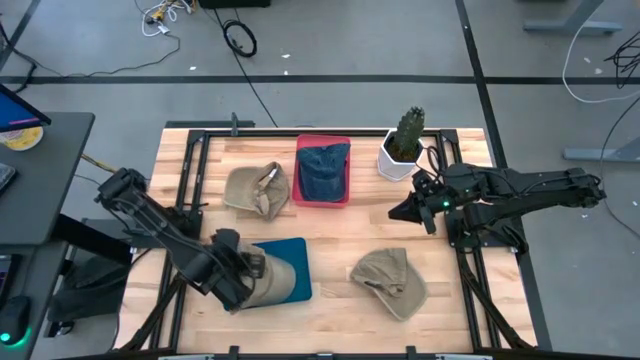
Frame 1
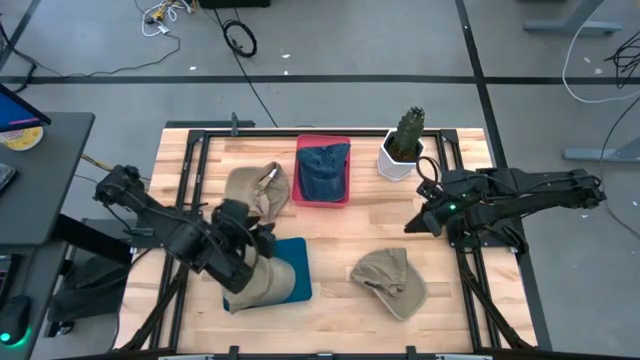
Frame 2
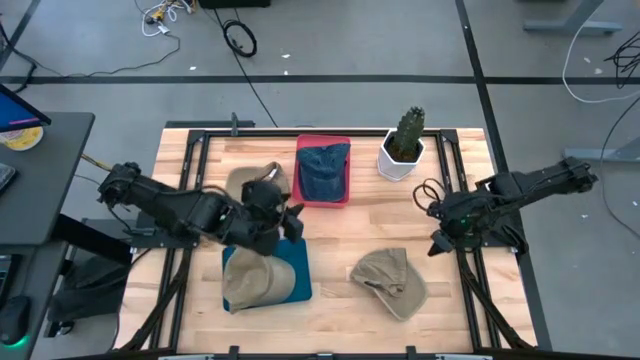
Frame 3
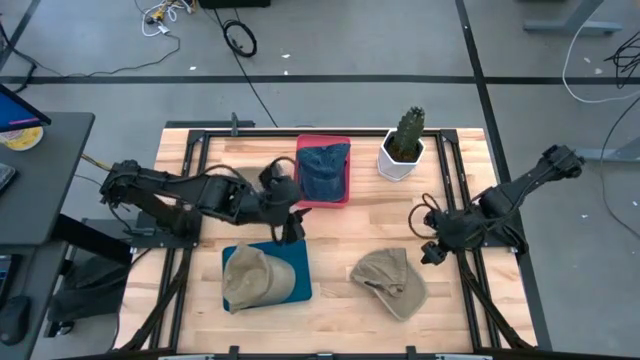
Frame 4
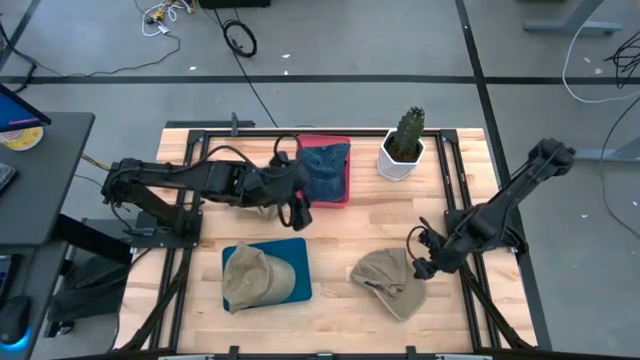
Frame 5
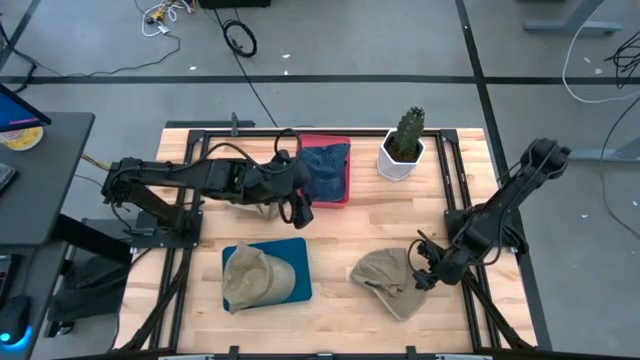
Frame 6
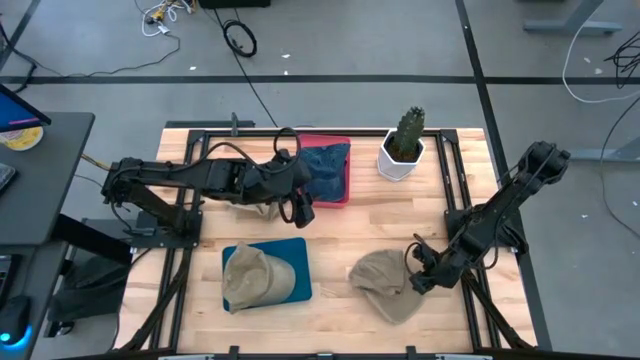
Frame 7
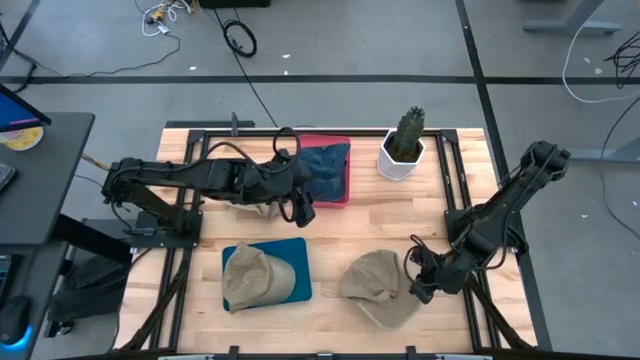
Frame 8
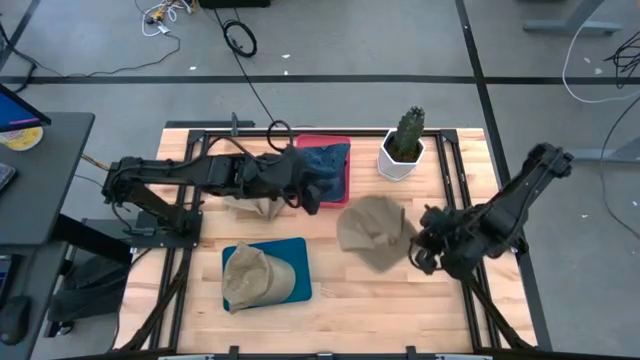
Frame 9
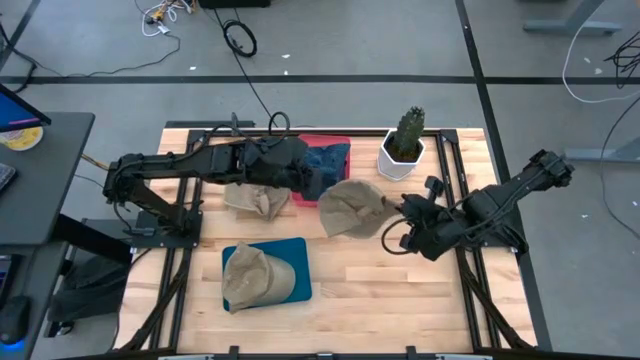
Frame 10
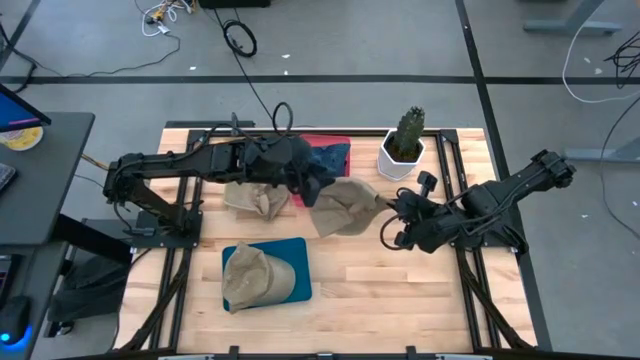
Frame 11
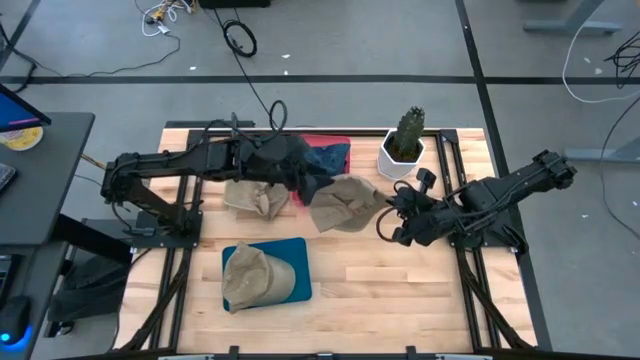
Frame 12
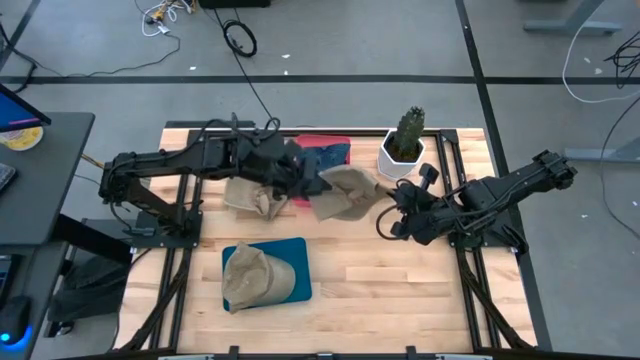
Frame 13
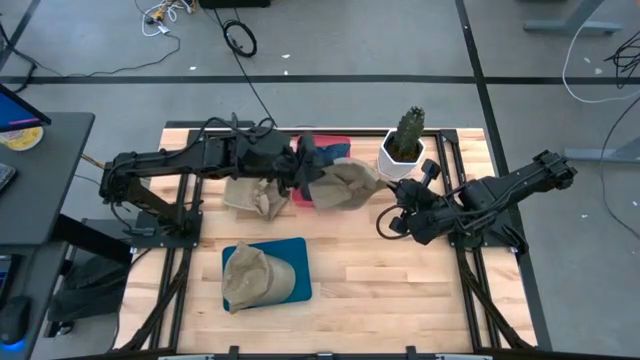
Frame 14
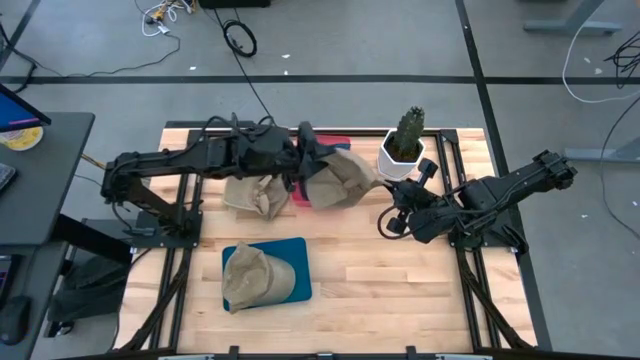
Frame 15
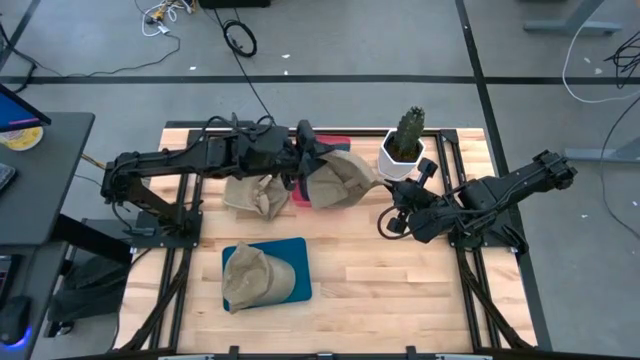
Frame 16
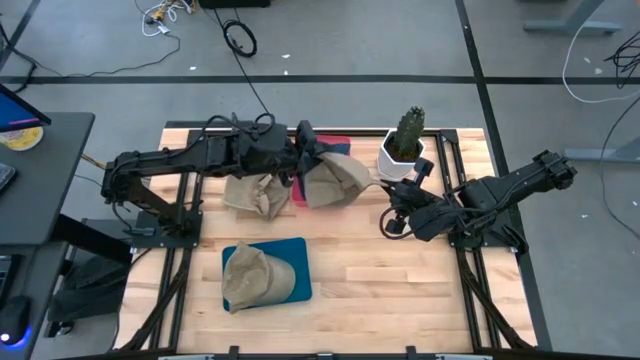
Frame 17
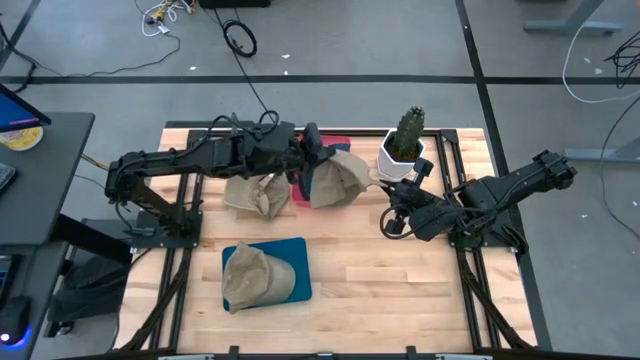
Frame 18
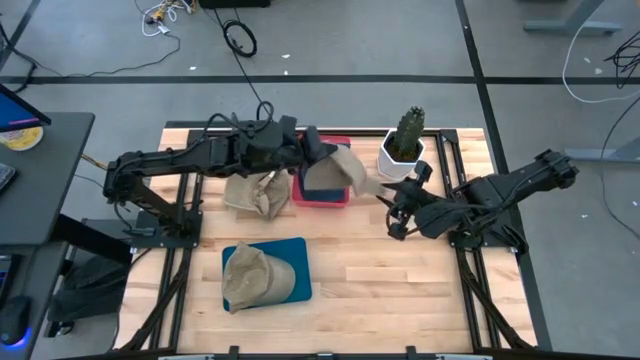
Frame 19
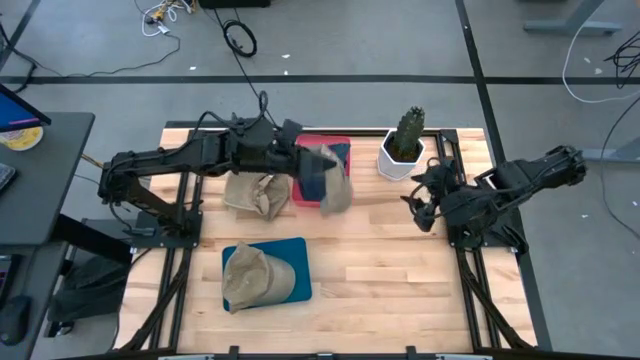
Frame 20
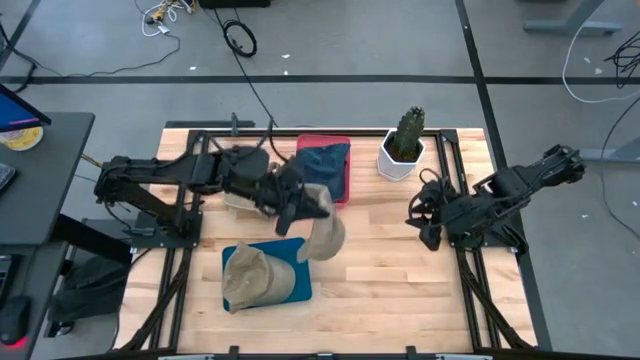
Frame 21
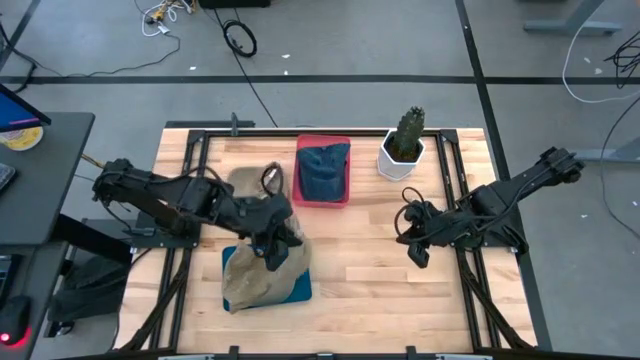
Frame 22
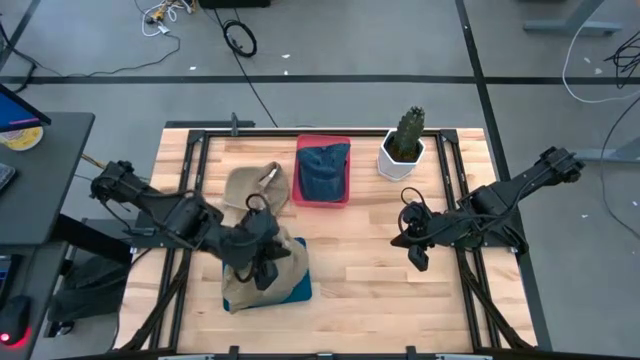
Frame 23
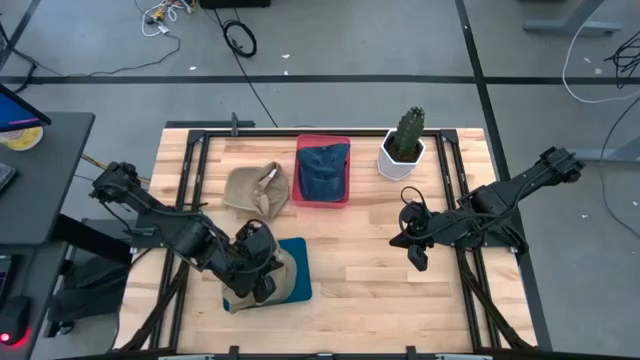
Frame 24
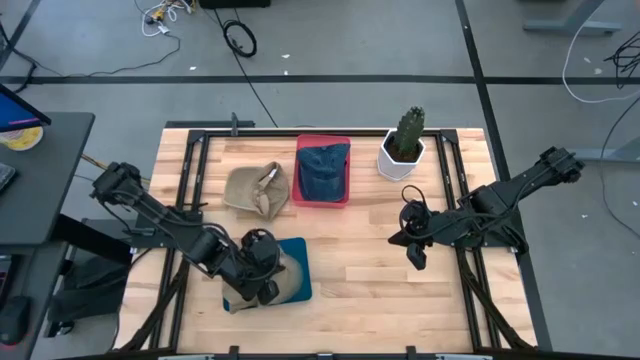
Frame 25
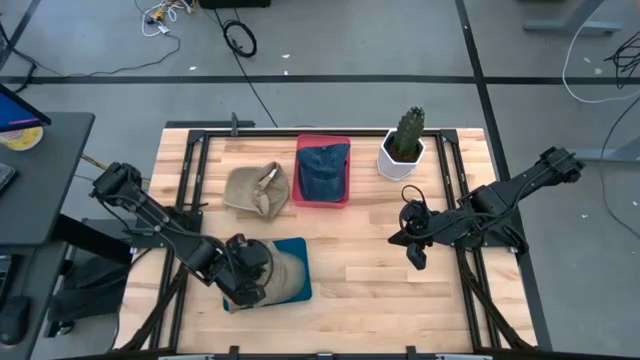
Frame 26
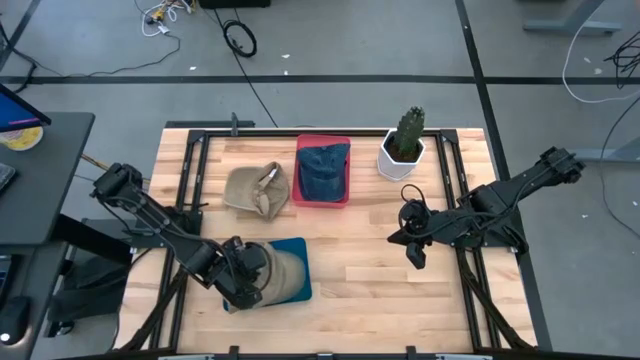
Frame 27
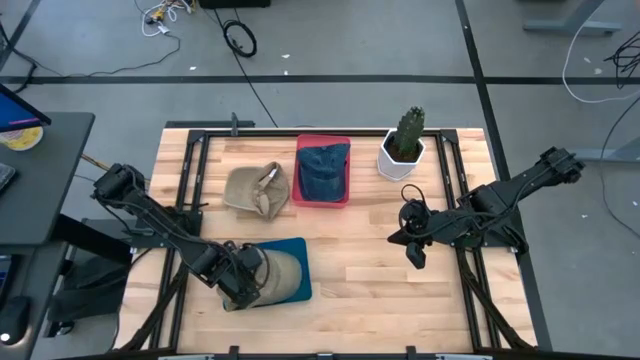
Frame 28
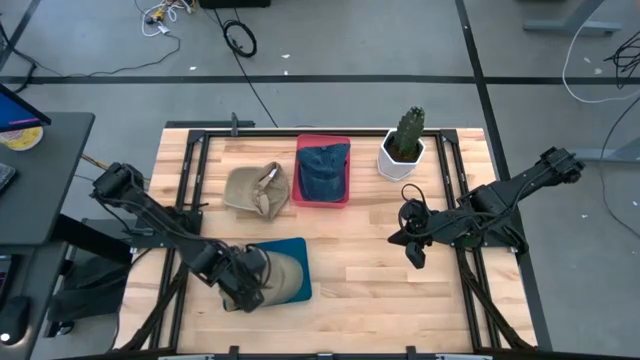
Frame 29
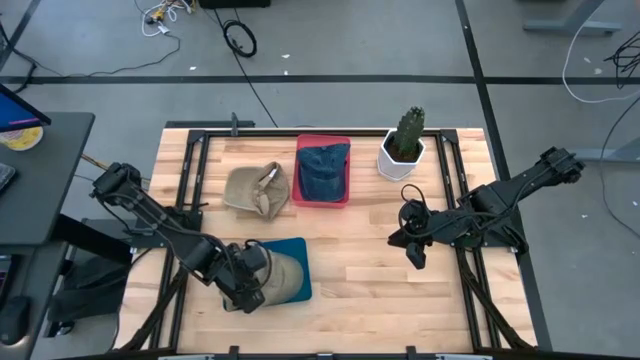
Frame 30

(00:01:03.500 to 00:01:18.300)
Task: Pick & Place hat
Put the bottom right brown cap into the blue bin
